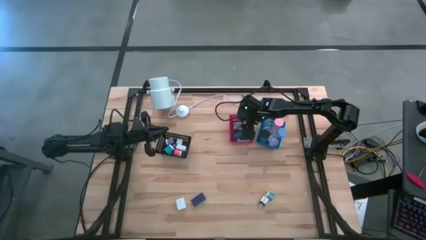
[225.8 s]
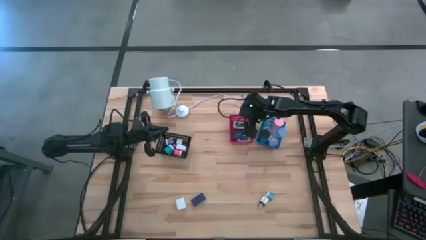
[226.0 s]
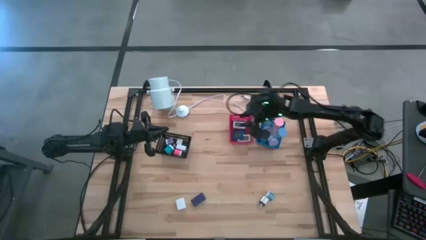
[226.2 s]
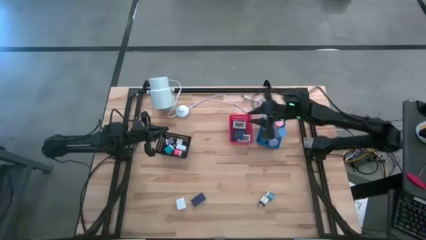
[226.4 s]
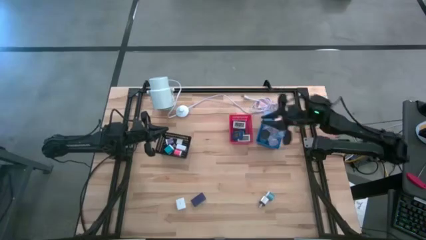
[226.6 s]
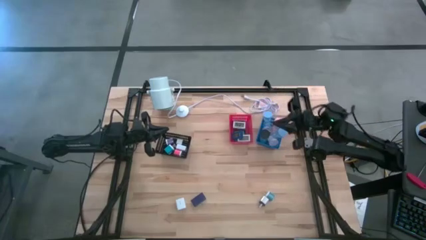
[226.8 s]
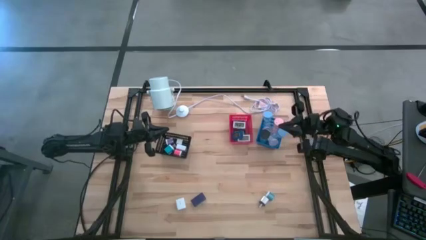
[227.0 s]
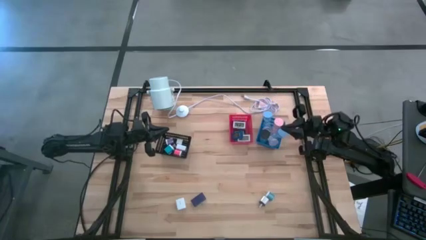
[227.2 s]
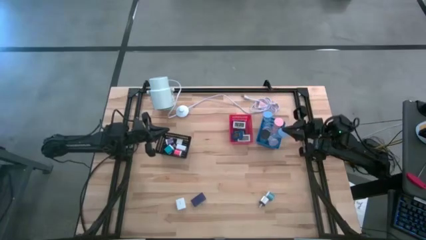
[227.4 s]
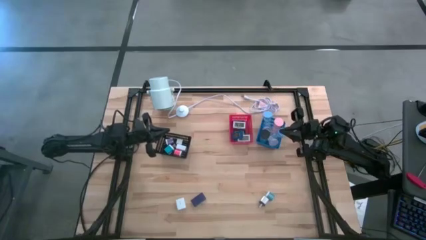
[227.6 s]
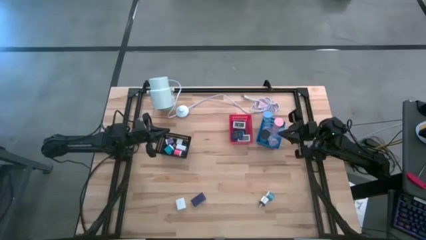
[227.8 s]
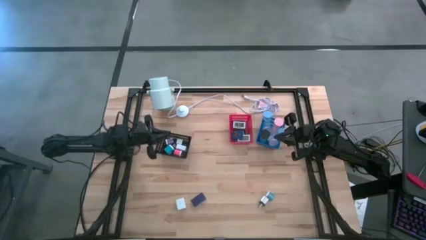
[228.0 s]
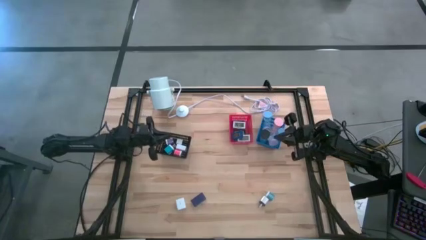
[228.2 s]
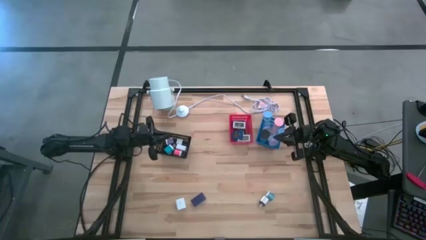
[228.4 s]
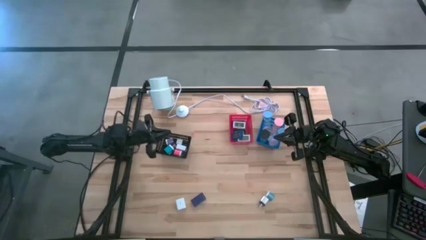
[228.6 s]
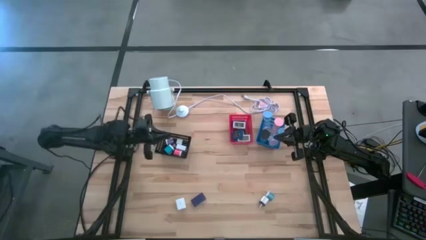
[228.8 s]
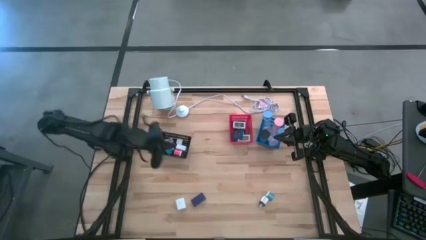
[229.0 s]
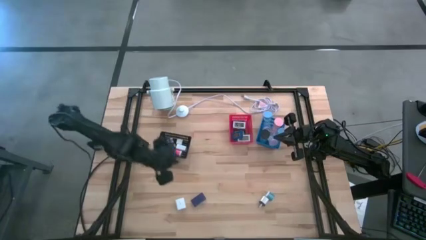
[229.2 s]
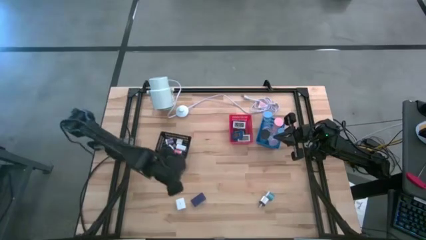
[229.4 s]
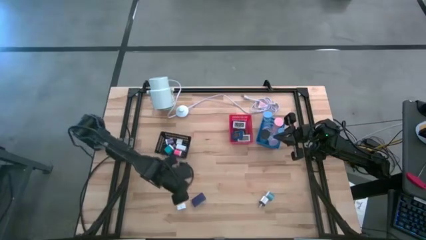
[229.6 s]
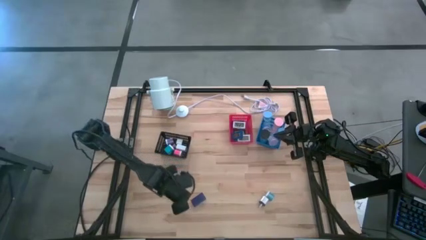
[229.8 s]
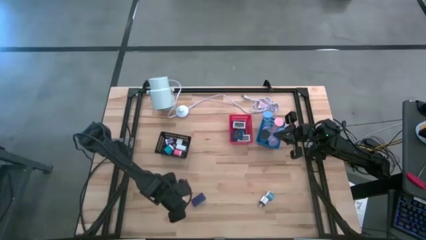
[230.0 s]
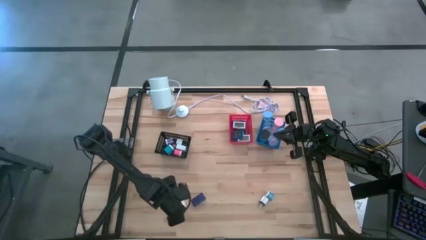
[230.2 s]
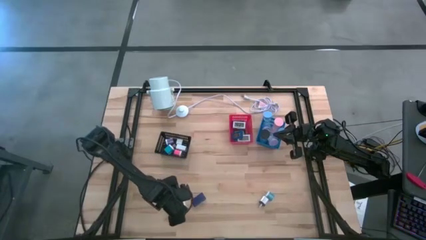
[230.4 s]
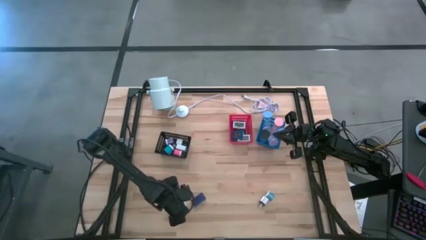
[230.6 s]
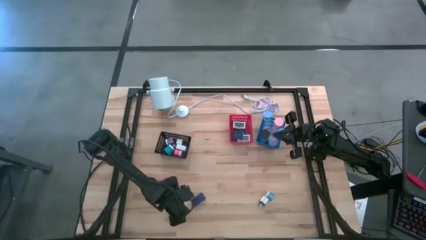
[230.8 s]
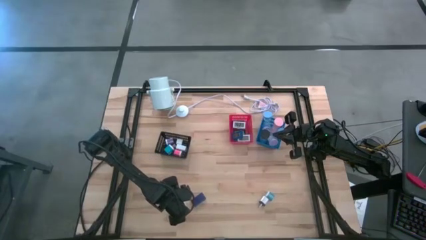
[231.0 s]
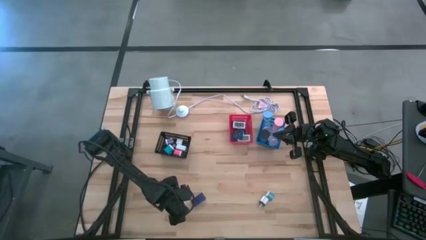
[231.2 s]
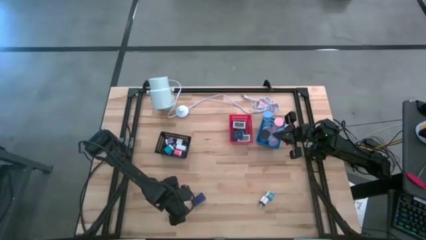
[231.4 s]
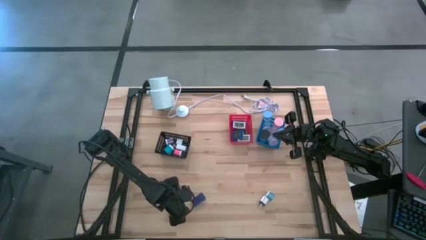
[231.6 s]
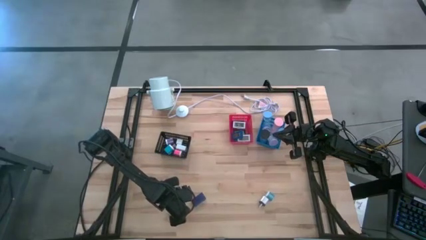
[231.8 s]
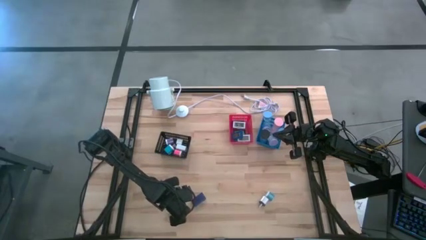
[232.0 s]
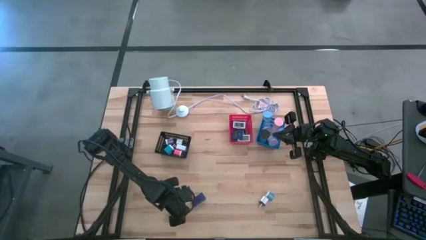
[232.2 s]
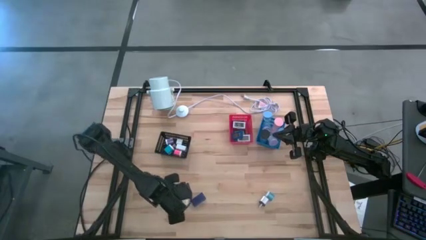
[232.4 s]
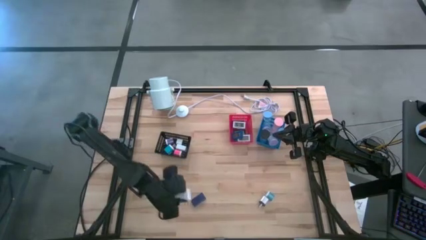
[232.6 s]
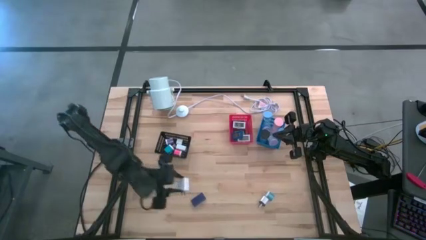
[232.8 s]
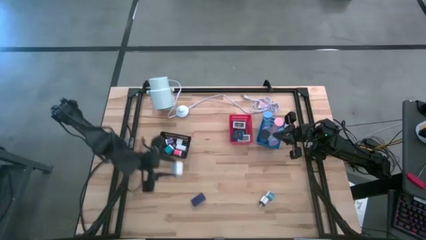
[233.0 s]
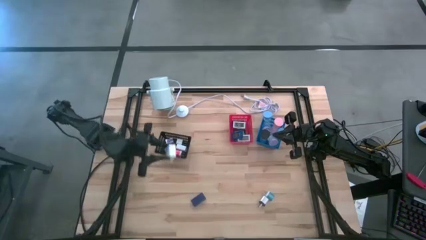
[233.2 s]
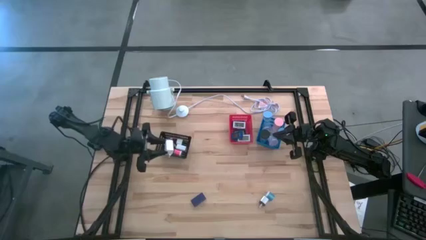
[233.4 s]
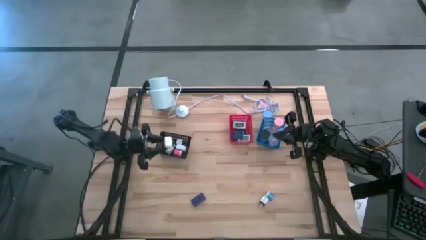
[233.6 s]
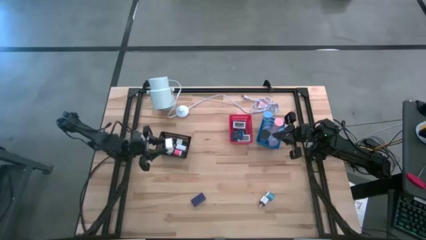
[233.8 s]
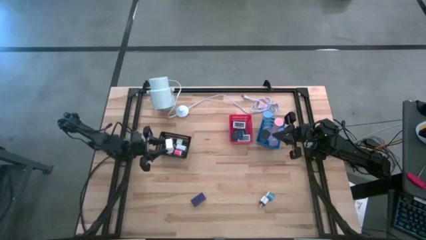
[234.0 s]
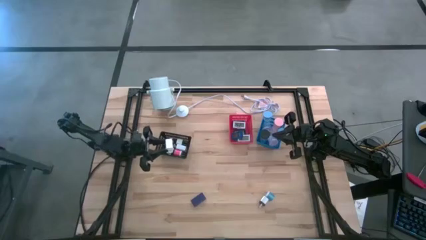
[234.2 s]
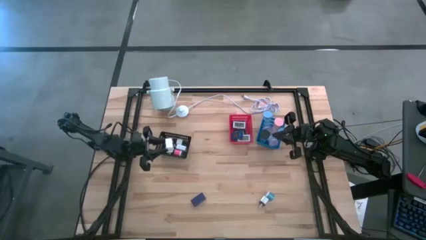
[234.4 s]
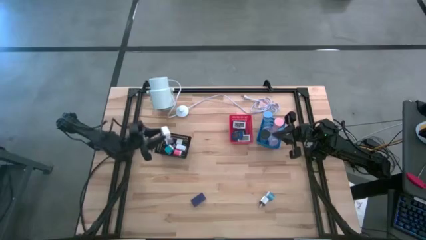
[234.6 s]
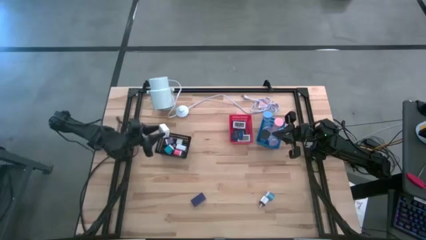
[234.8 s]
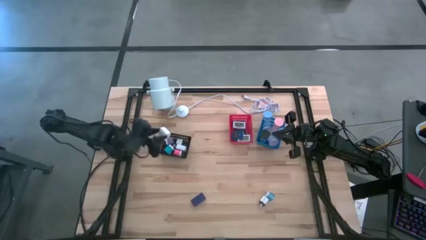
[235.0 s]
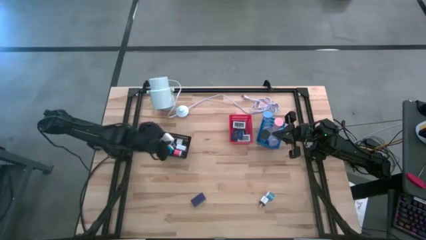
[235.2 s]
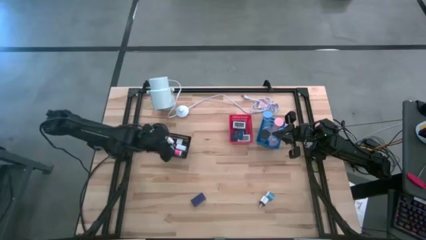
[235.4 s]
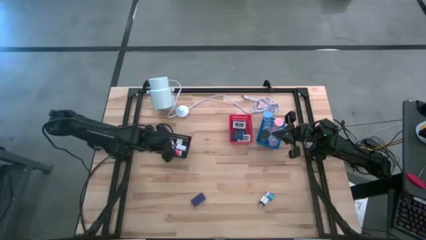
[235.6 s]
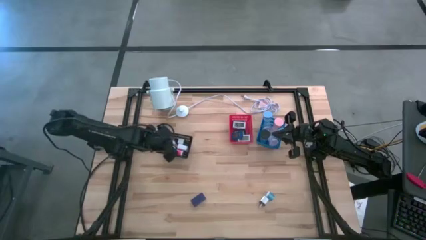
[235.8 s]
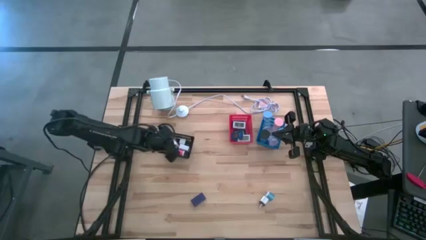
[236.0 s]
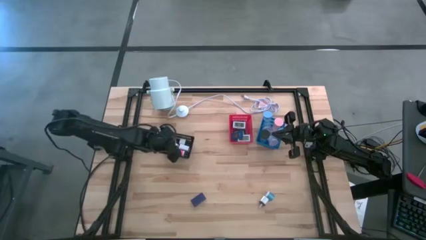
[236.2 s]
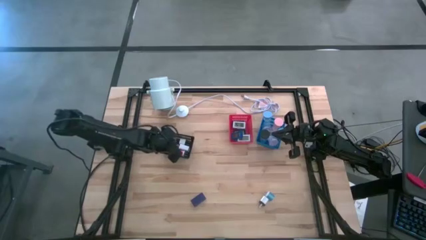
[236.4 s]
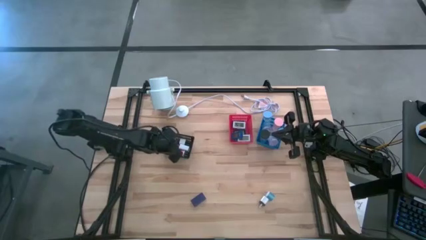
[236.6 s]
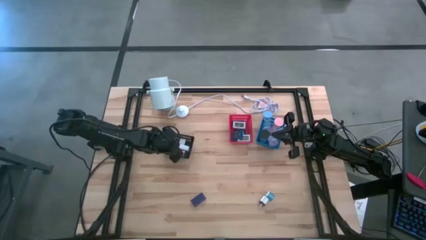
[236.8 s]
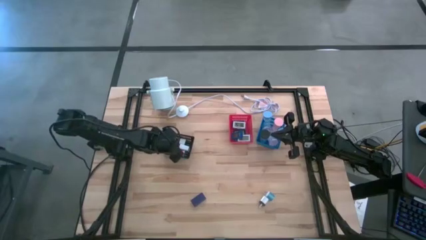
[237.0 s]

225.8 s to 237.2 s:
Task: Pick & Place Office items
Put the white charger adaptor into the black bin

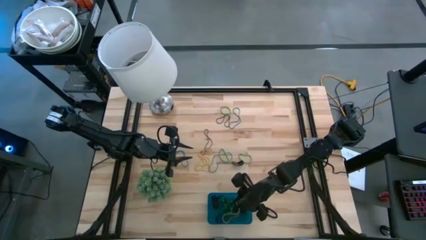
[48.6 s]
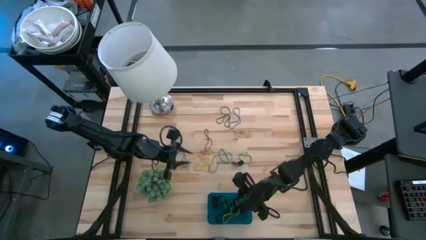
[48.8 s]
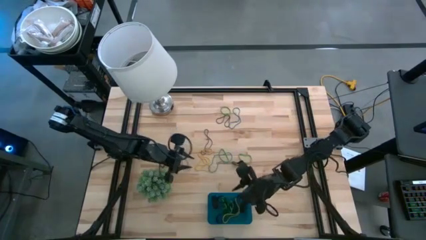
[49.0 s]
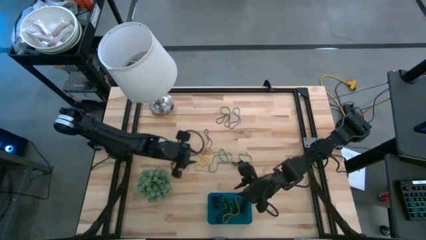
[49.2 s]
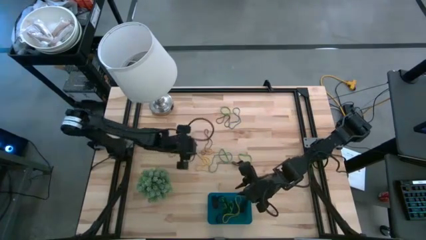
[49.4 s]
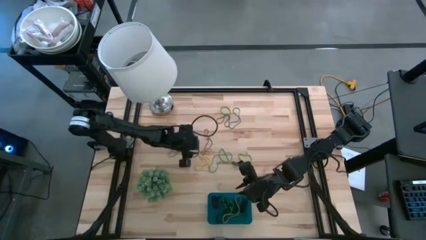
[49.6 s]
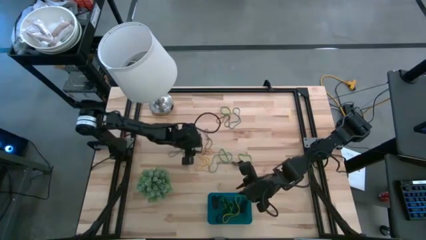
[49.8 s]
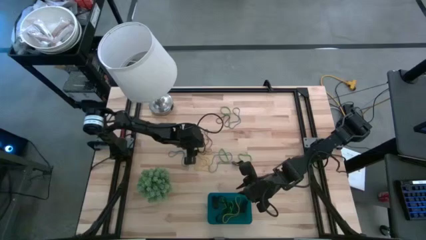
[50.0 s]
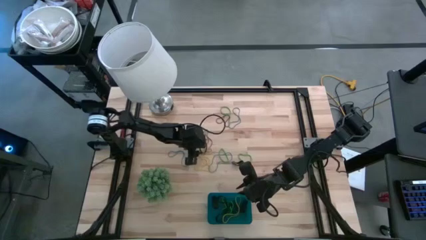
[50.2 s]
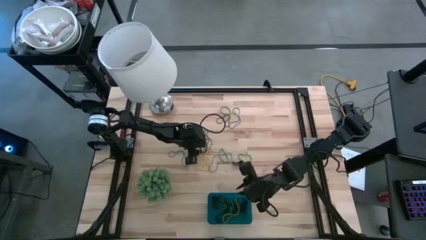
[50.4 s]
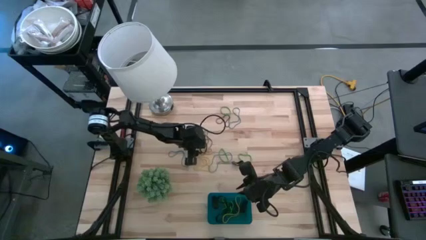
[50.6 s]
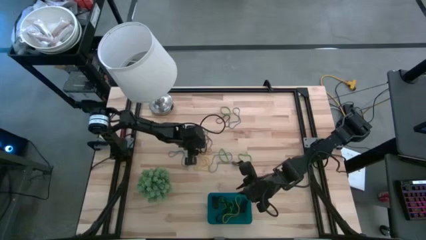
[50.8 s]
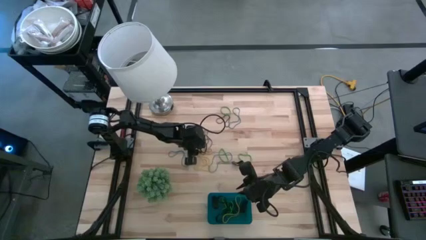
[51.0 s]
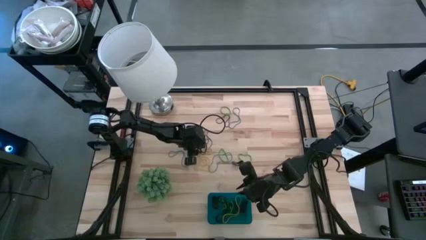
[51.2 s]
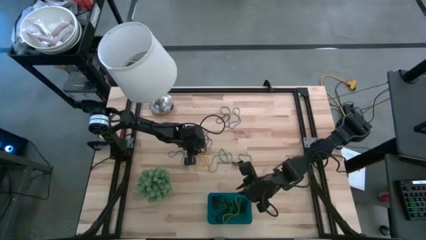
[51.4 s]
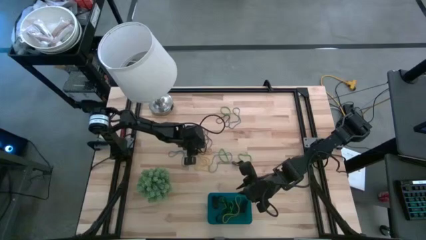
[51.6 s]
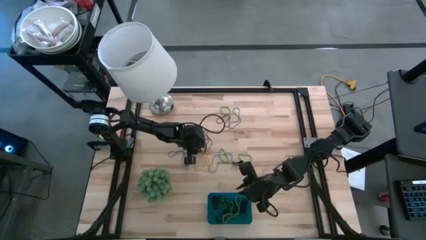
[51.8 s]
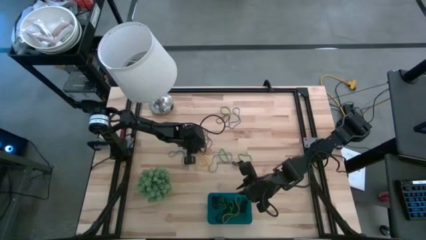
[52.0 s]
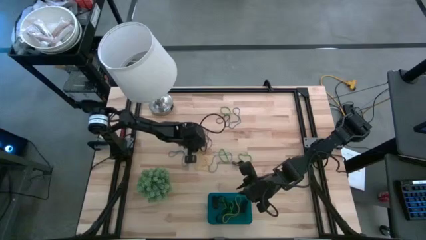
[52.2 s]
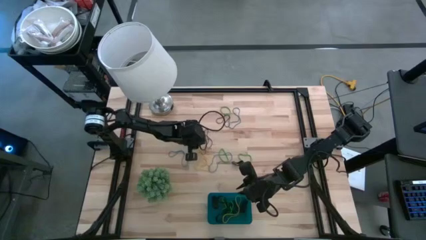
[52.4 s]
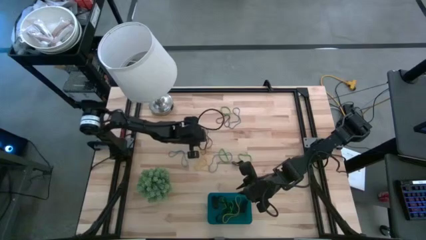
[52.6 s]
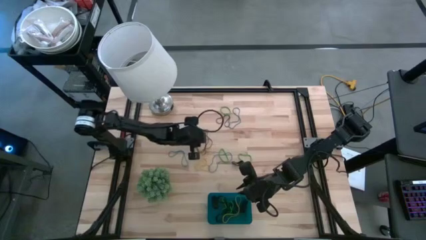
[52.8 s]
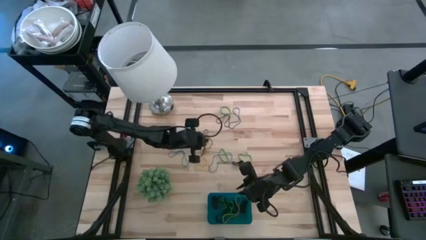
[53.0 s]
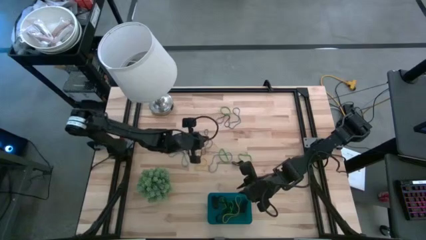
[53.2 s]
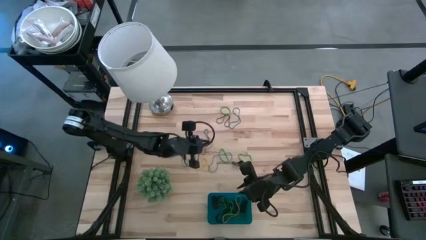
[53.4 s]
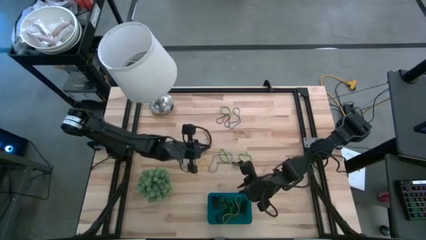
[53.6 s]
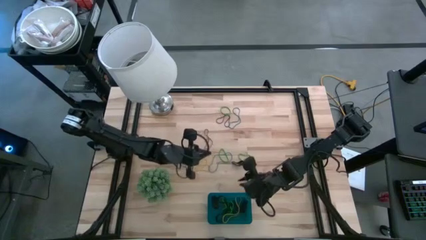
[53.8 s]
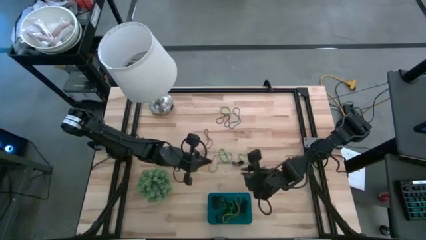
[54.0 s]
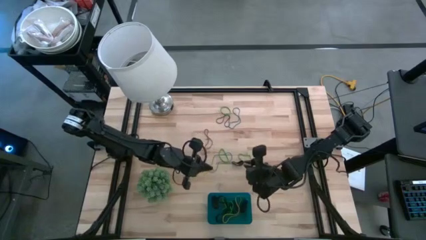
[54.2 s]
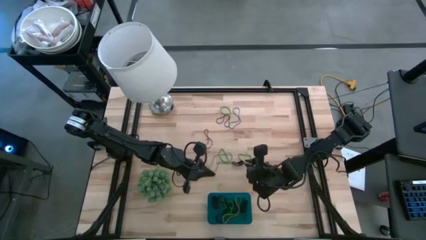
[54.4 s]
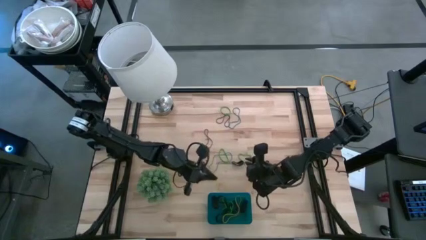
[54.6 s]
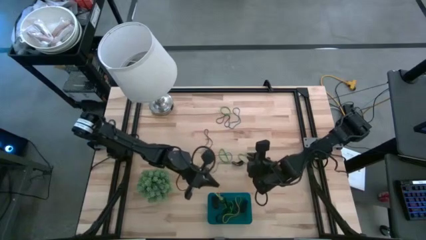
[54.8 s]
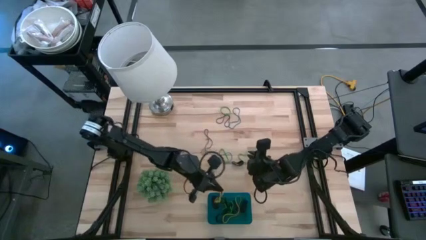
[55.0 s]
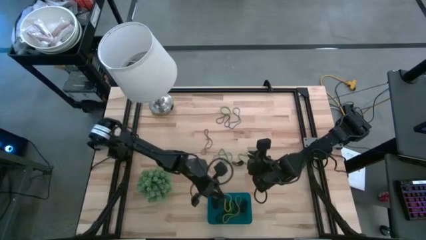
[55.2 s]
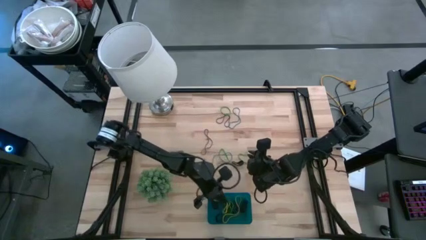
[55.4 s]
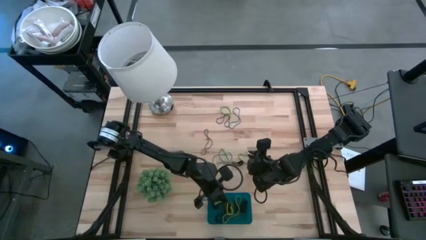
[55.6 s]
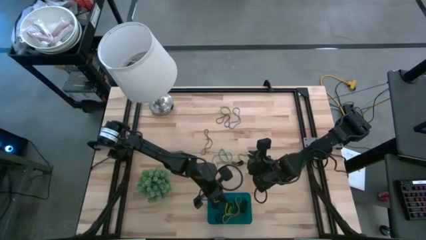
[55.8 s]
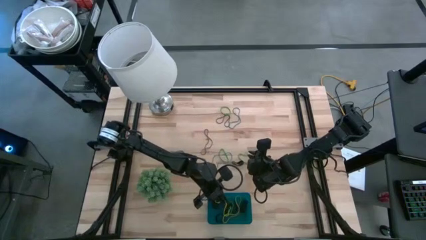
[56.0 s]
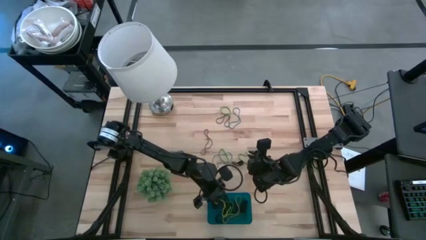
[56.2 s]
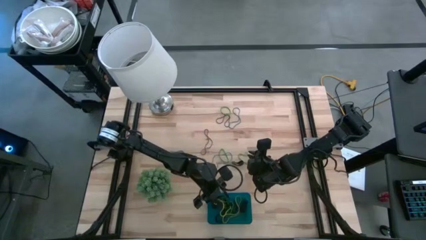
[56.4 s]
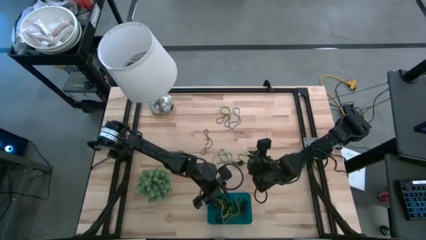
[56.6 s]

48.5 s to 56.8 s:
Task: Pick and place rubber bands into bin
Put the yellow rubber band into the blue bin
